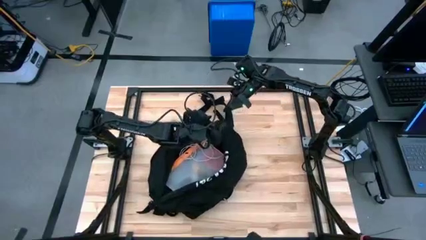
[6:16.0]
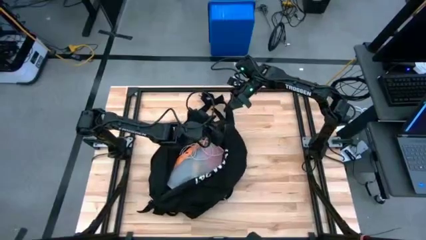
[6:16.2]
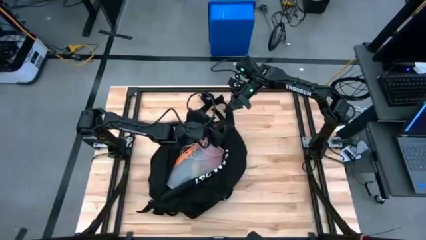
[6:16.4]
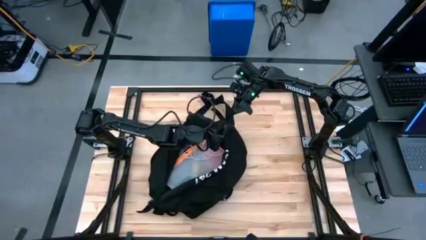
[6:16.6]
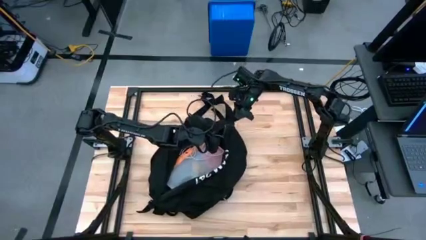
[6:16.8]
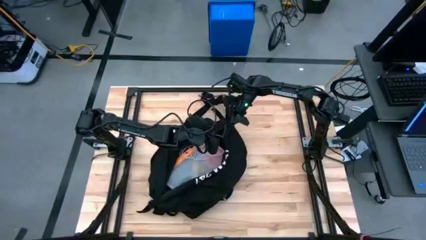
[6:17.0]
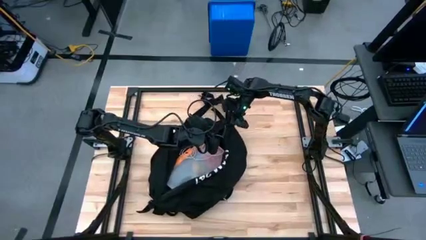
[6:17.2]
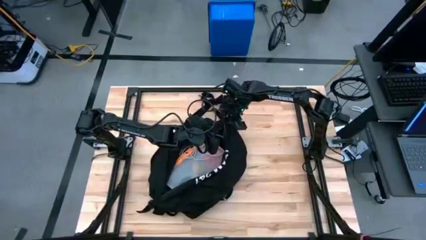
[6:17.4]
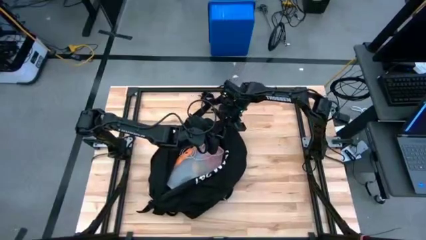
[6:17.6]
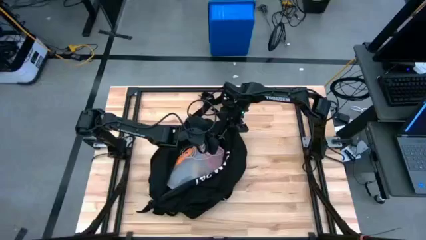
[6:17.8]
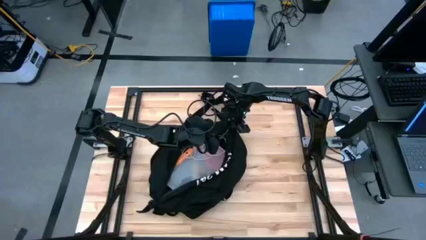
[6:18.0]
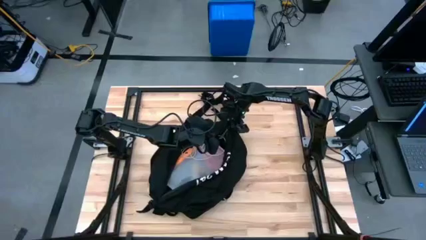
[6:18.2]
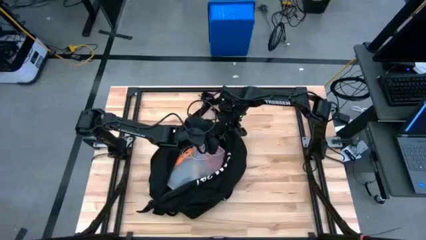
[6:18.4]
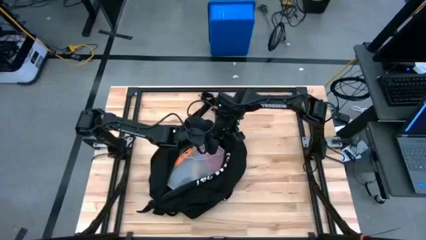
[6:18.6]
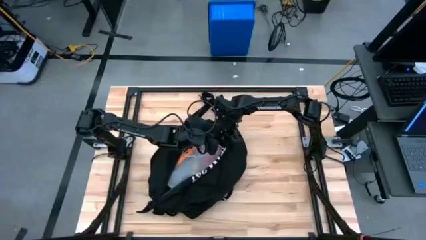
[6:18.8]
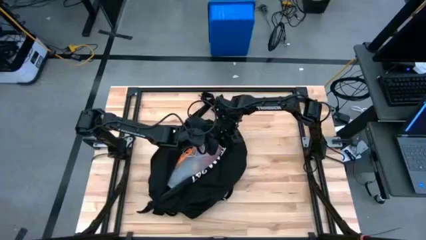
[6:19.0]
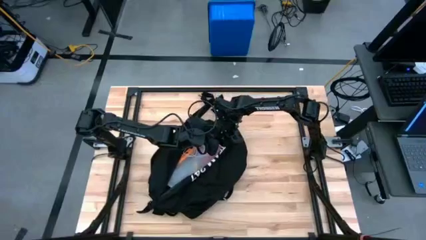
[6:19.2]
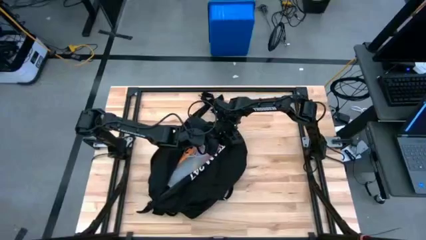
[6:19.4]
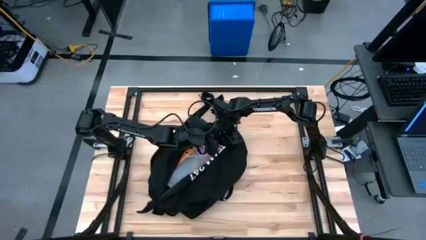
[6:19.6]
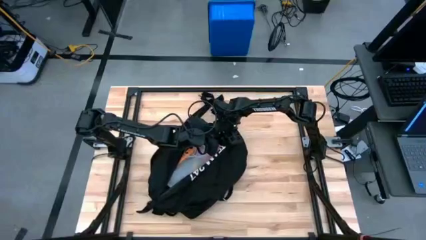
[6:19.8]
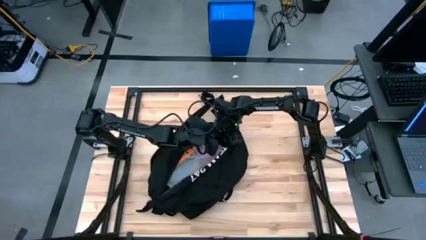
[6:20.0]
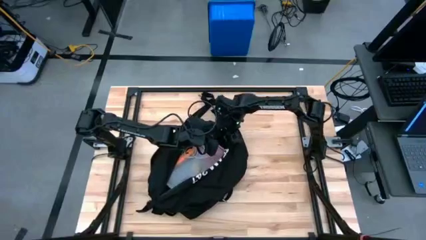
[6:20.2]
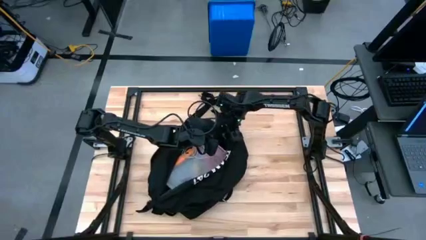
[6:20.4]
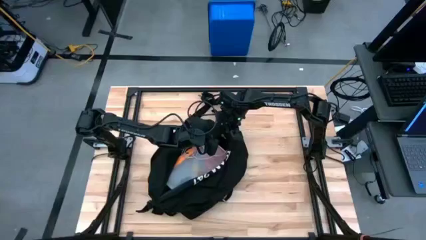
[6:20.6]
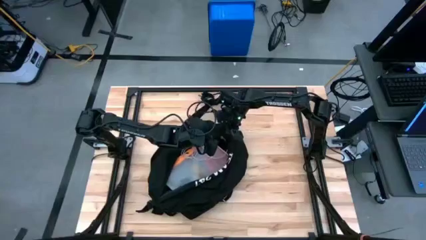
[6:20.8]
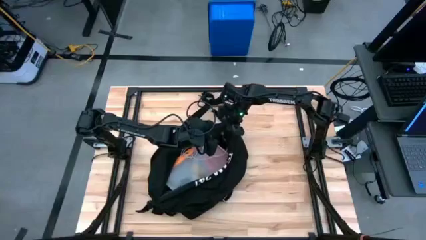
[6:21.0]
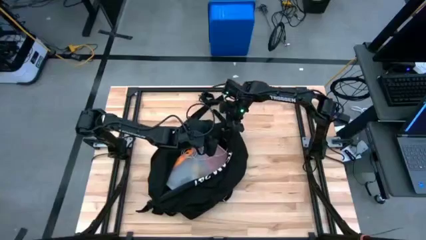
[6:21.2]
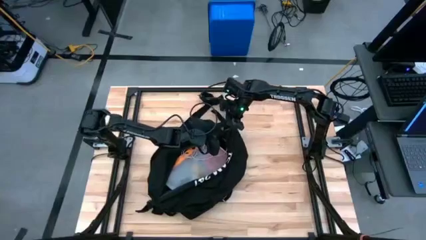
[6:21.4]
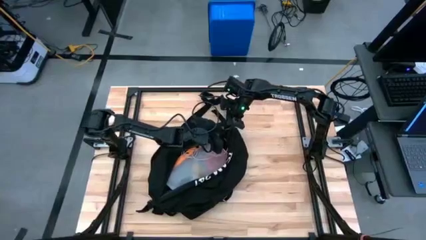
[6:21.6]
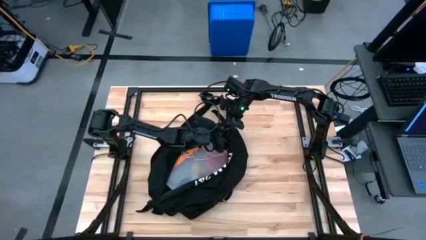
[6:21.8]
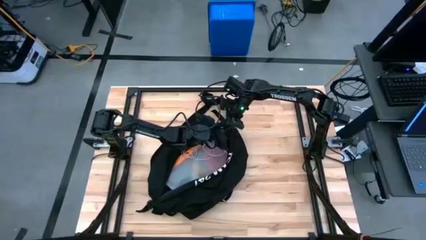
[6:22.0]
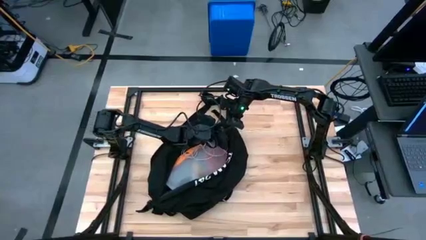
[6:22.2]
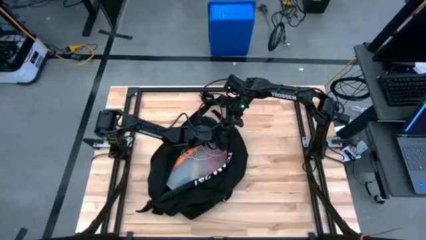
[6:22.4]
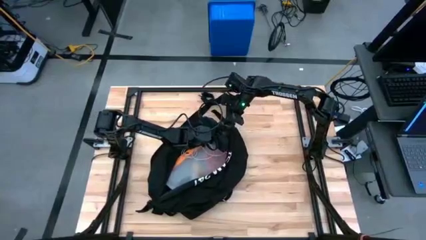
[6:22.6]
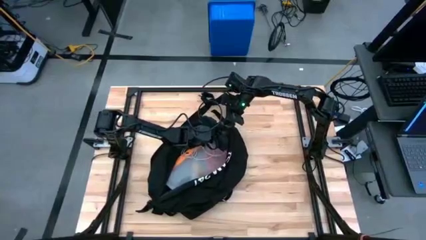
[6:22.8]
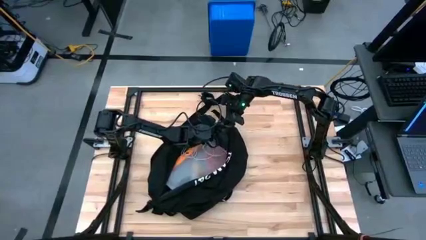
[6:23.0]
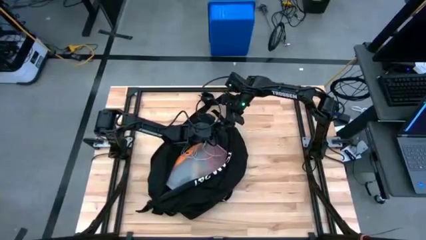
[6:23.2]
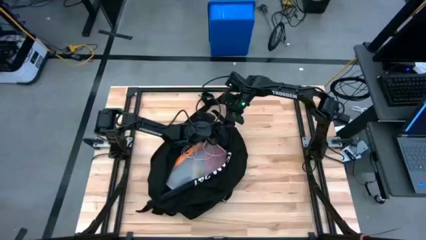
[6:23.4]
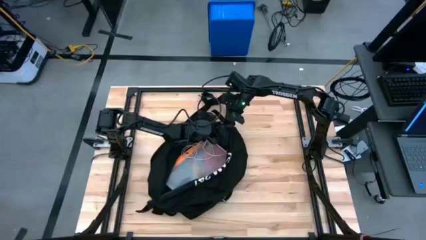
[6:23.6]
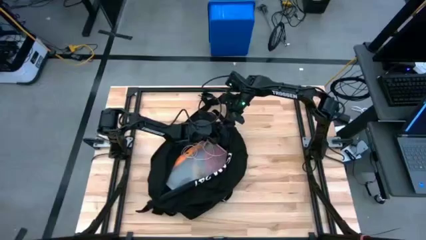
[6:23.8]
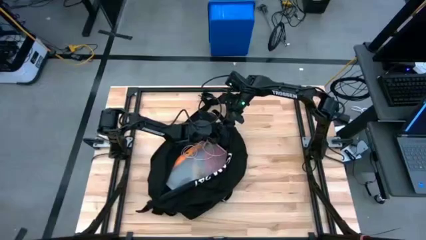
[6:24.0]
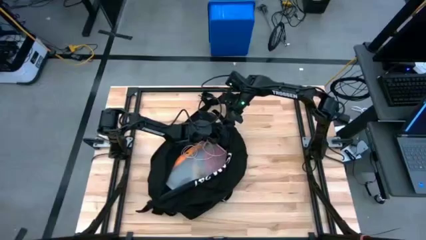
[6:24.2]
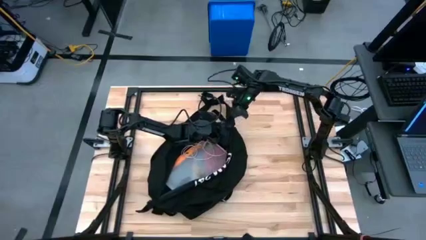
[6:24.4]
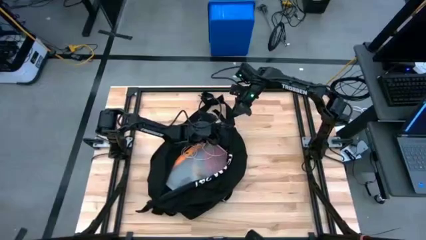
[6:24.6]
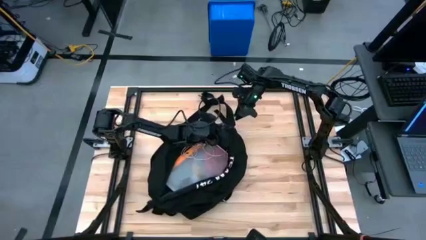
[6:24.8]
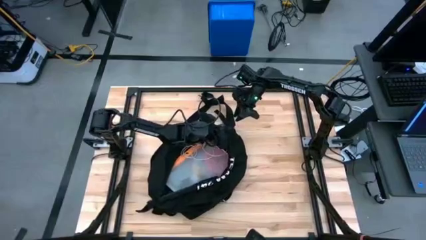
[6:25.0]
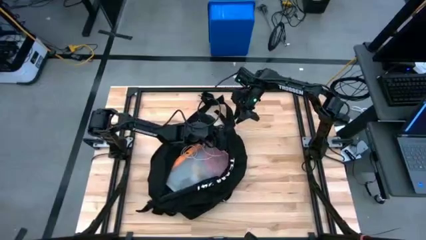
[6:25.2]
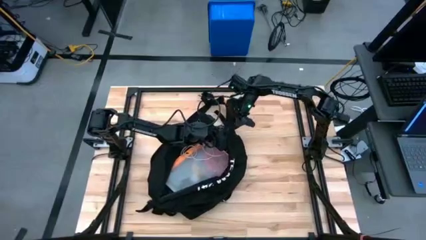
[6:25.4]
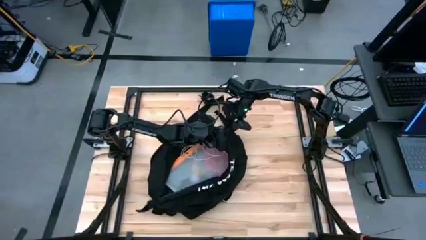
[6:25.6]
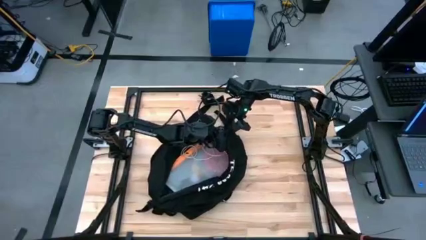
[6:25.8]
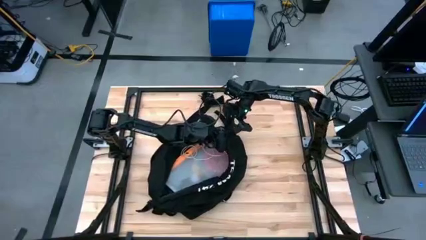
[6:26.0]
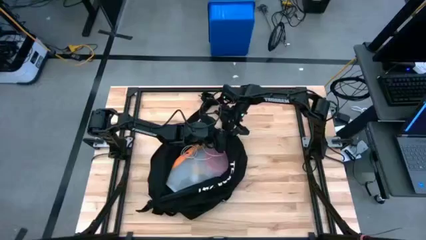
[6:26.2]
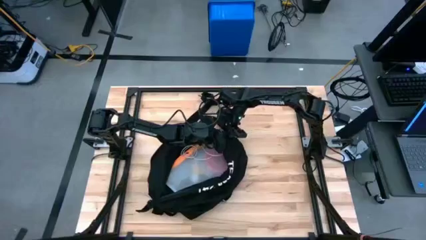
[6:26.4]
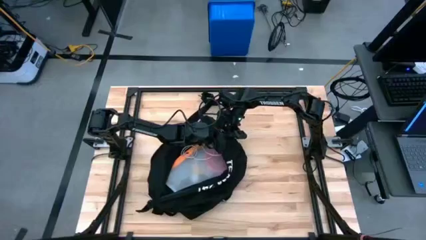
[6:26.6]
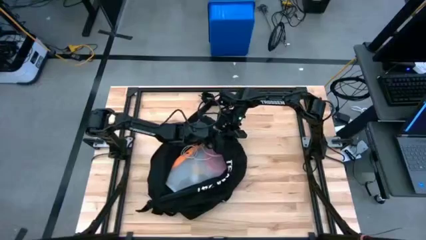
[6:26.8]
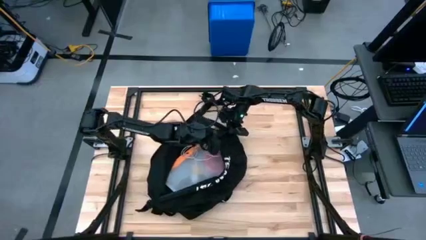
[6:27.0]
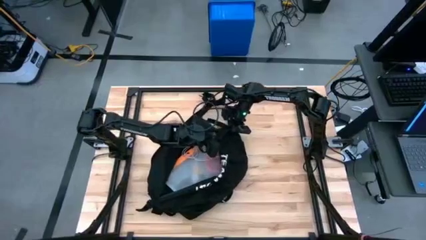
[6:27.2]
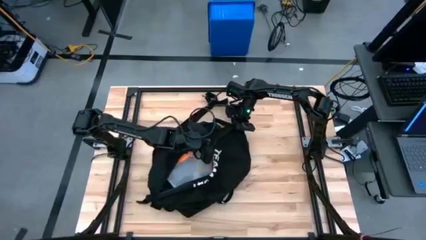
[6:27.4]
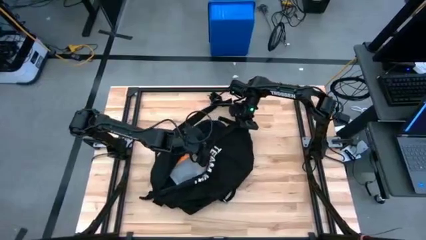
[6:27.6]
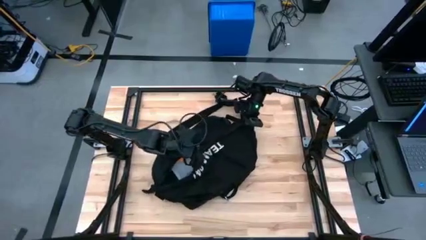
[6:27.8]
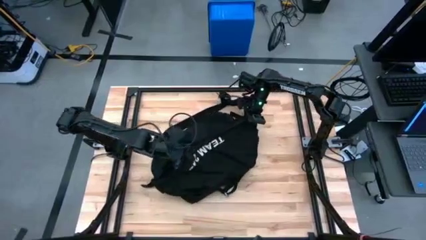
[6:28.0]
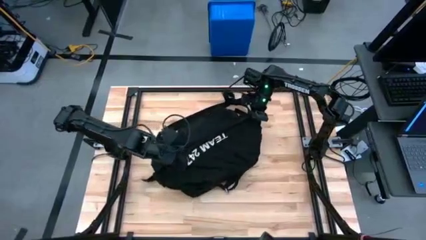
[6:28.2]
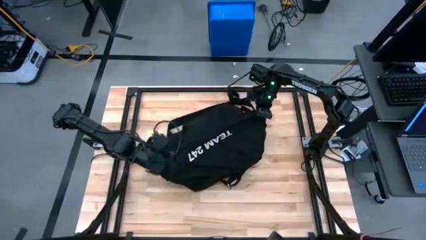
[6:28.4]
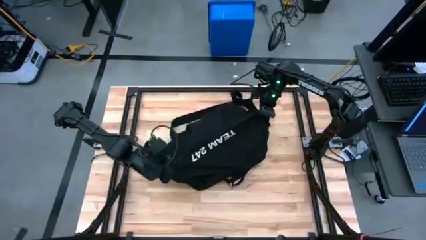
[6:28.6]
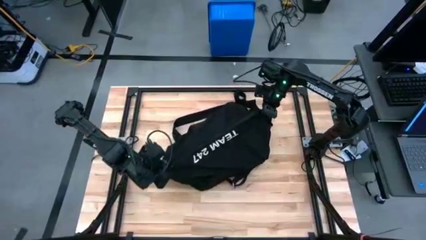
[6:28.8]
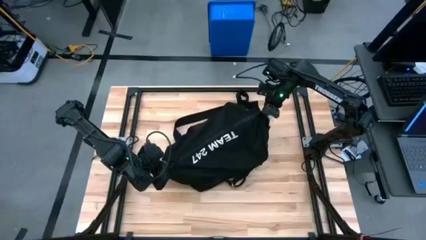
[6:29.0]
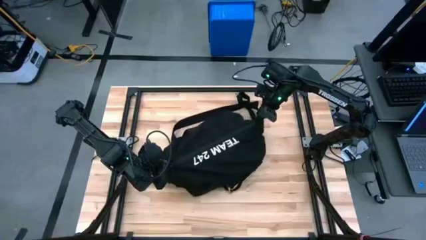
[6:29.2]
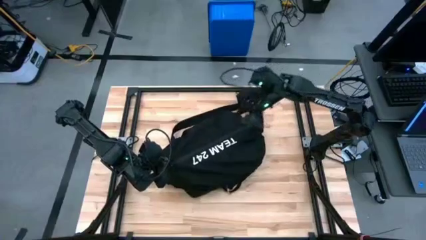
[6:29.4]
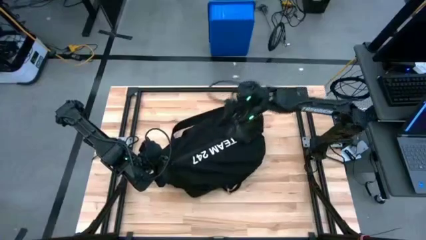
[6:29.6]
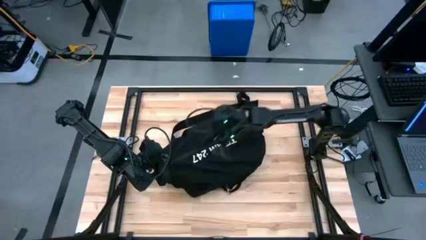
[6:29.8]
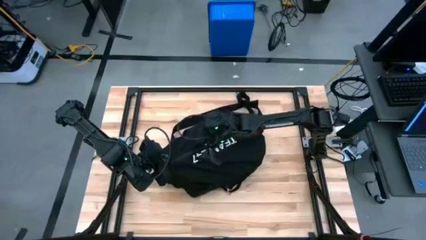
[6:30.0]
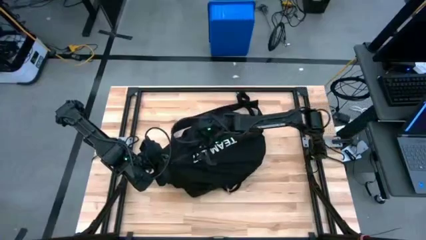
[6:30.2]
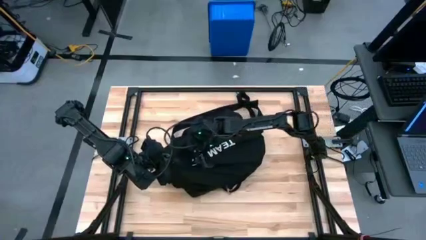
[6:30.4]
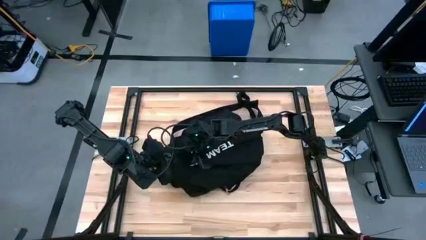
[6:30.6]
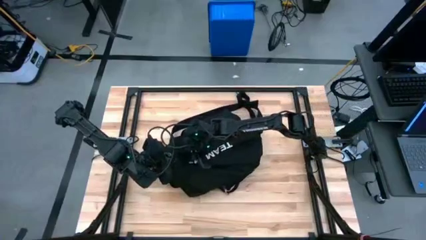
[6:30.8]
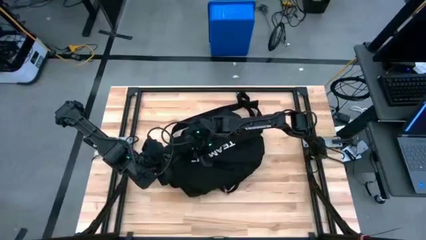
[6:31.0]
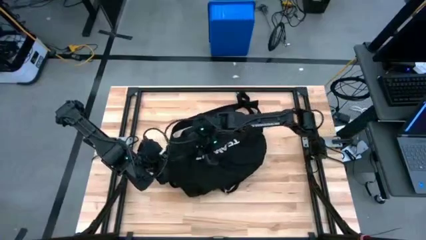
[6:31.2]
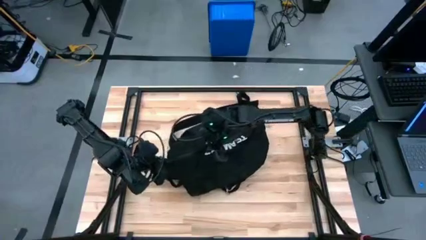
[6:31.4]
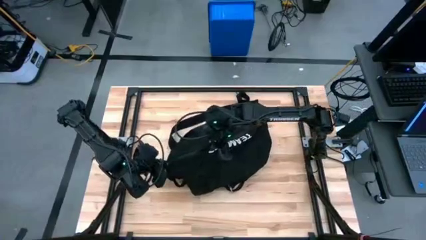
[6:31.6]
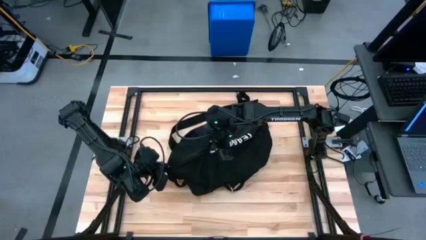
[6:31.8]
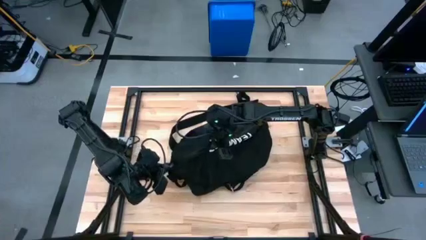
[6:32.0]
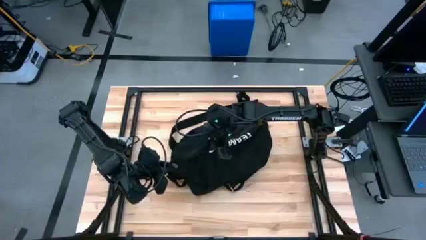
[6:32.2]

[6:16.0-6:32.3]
Task: Unpack backpack
Close the black backpack

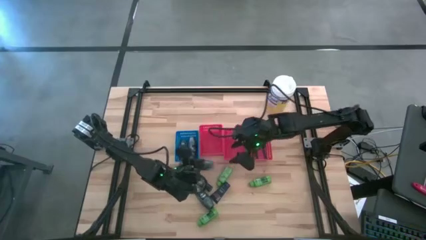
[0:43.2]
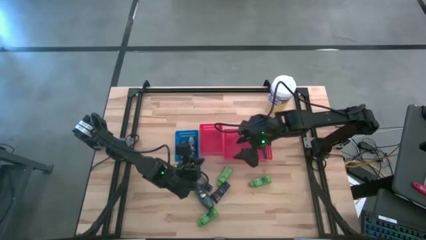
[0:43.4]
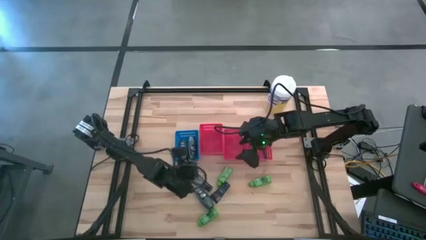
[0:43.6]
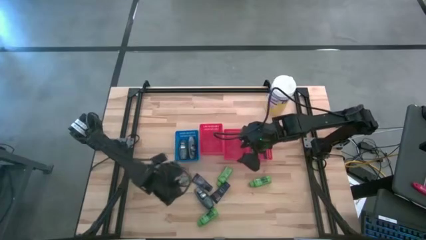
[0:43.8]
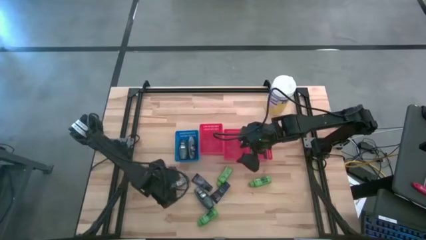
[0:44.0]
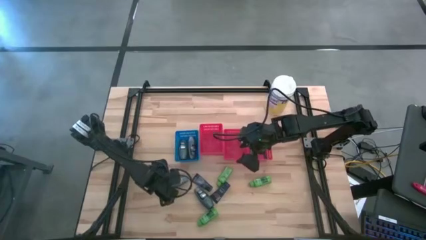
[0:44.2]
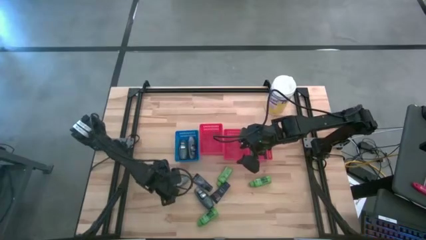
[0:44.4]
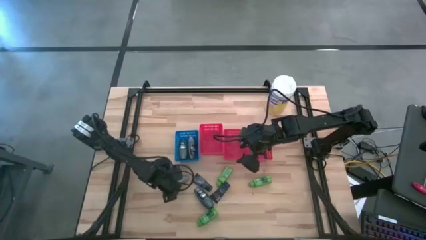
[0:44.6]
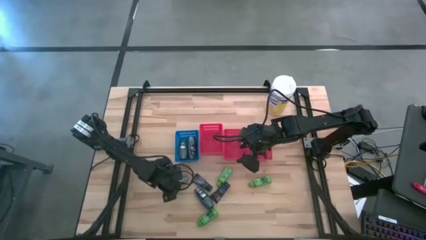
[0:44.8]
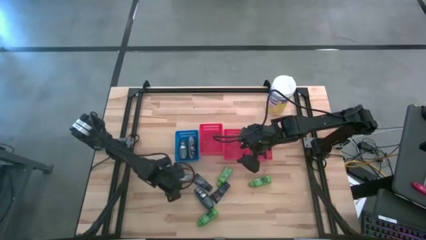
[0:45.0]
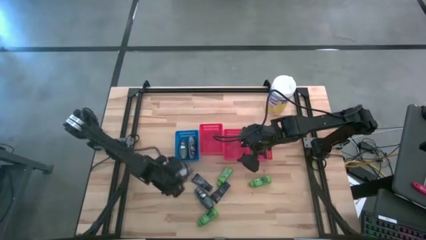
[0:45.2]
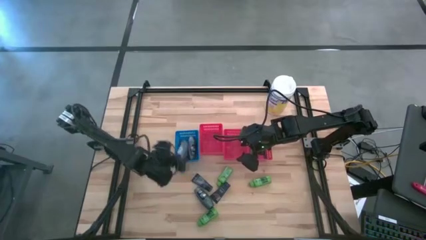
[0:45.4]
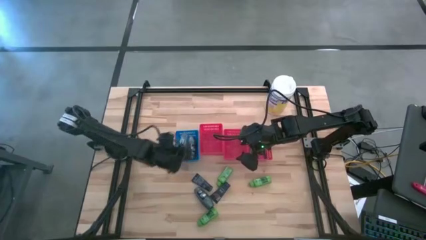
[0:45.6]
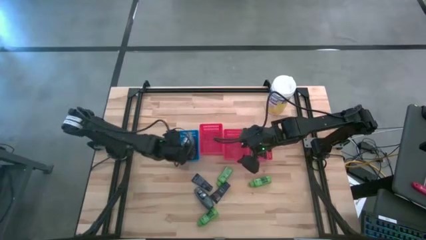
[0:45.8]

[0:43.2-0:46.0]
Task: Pick & Place Travel size toiletries
Put the gray deodorant into the blue bin
